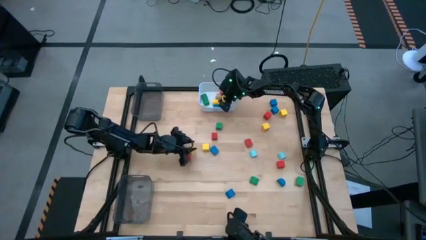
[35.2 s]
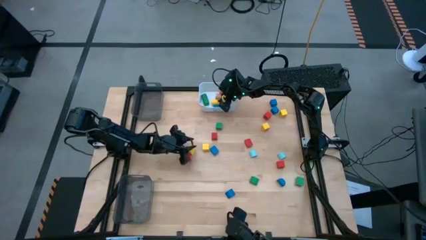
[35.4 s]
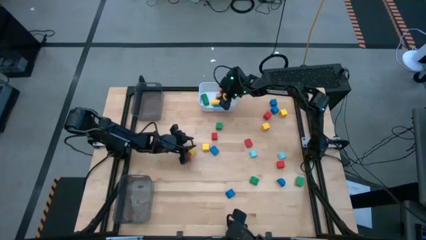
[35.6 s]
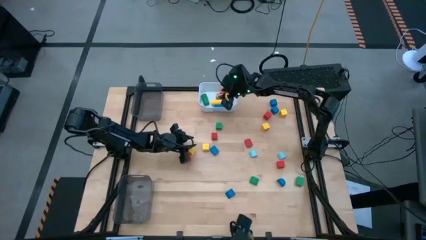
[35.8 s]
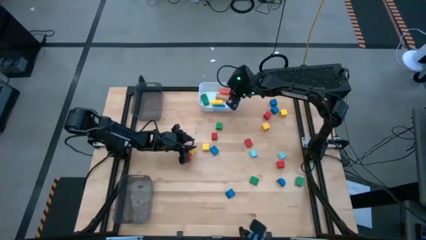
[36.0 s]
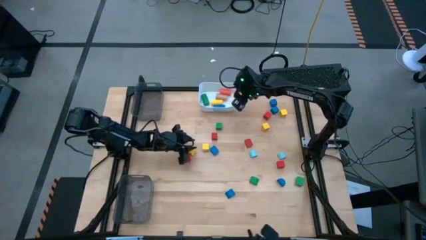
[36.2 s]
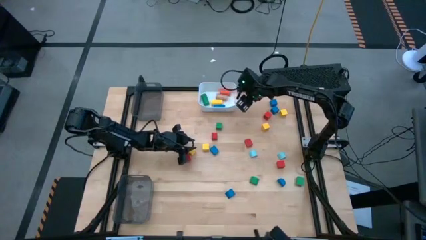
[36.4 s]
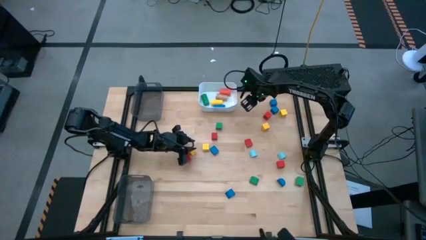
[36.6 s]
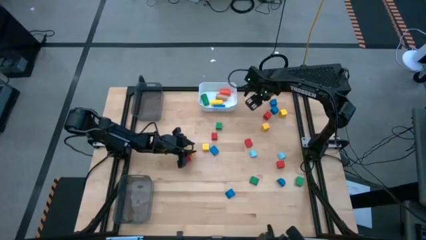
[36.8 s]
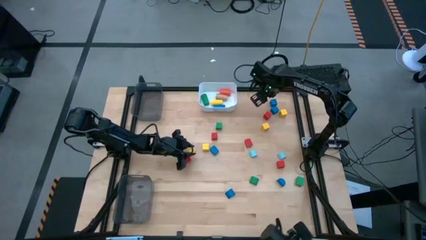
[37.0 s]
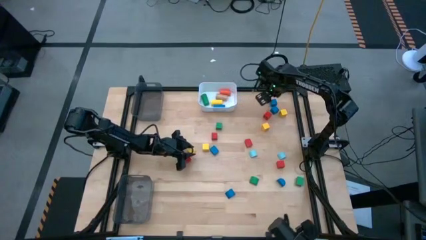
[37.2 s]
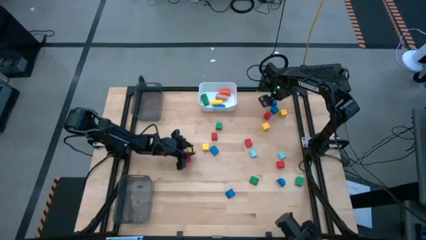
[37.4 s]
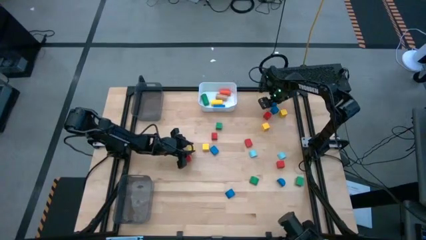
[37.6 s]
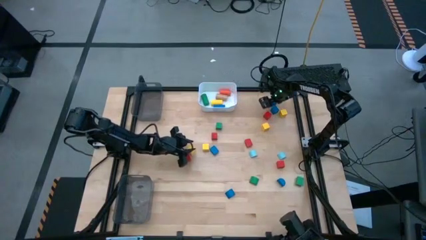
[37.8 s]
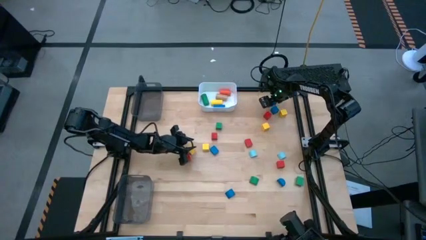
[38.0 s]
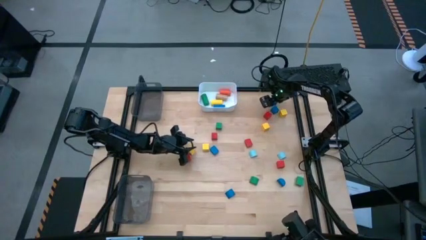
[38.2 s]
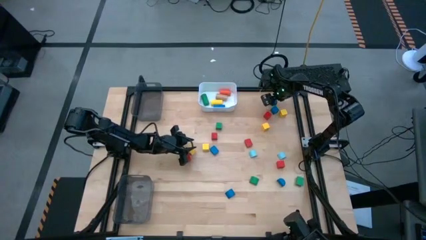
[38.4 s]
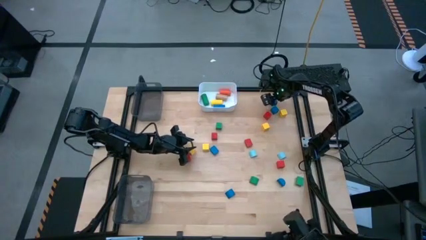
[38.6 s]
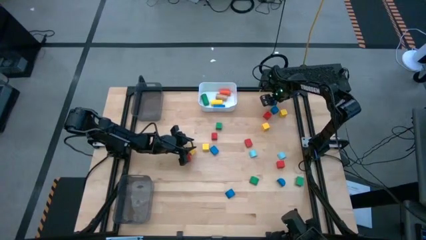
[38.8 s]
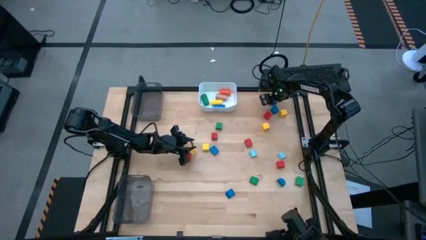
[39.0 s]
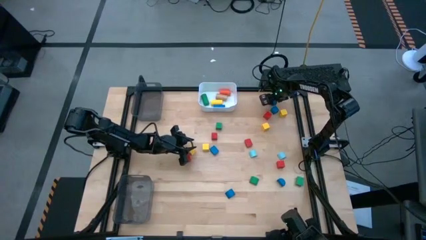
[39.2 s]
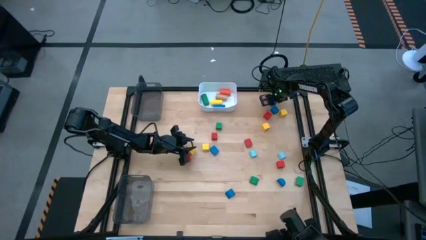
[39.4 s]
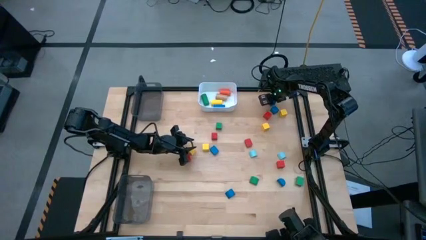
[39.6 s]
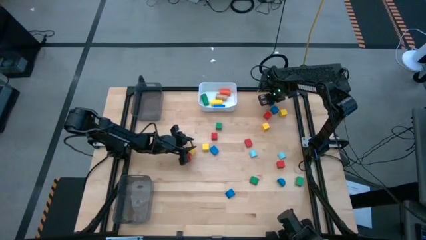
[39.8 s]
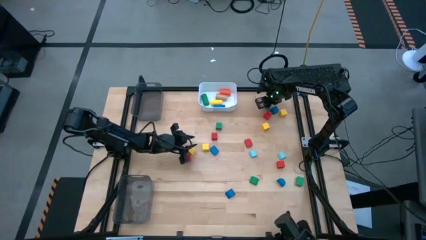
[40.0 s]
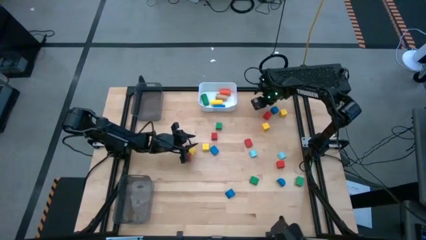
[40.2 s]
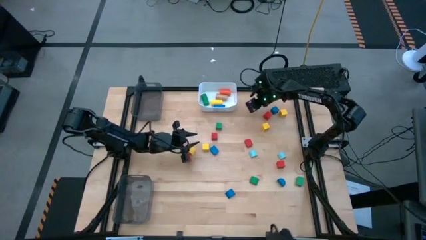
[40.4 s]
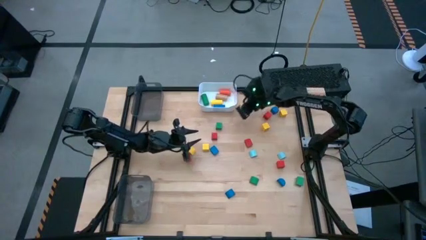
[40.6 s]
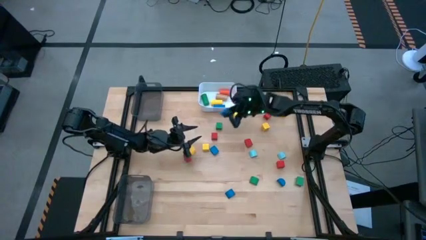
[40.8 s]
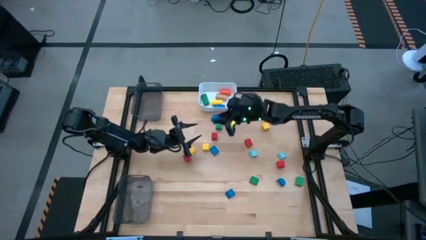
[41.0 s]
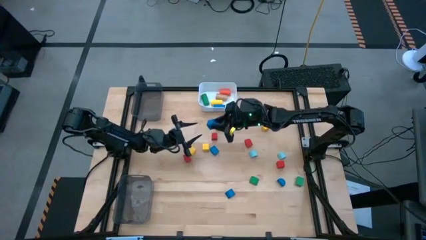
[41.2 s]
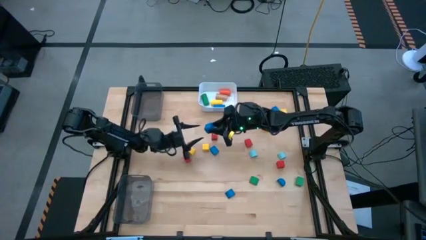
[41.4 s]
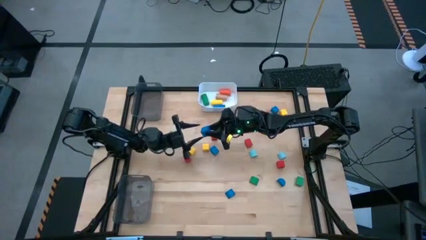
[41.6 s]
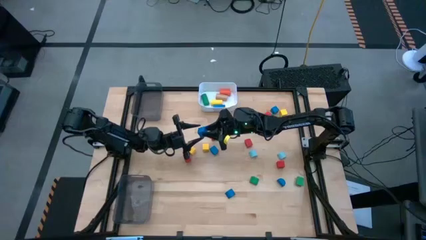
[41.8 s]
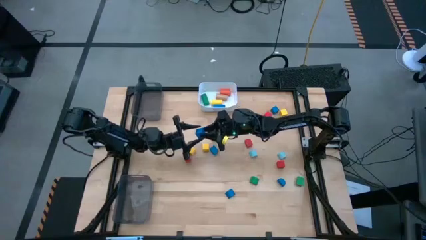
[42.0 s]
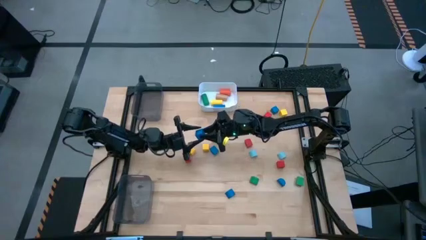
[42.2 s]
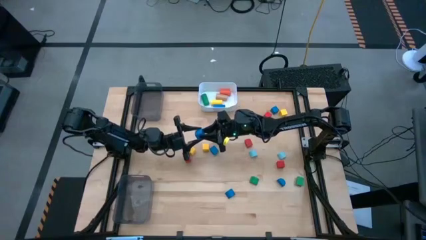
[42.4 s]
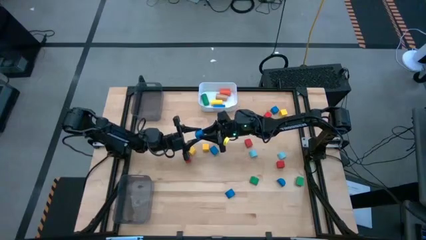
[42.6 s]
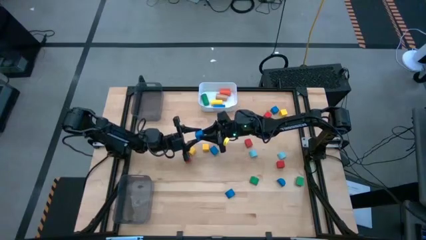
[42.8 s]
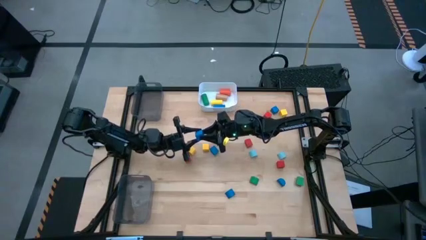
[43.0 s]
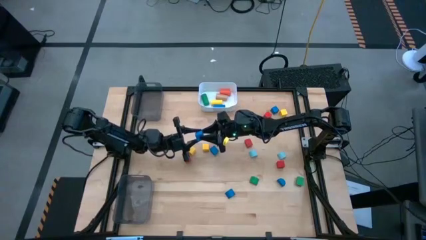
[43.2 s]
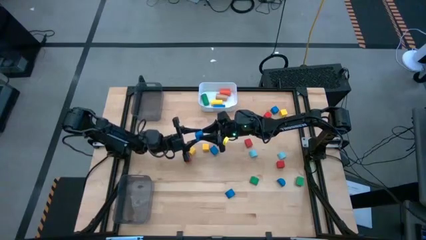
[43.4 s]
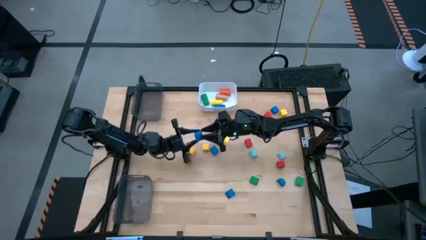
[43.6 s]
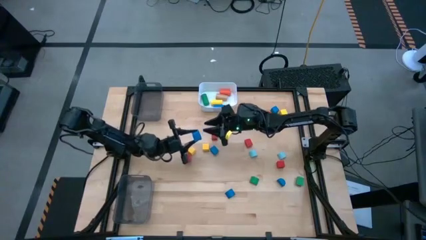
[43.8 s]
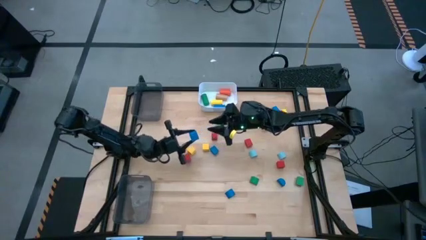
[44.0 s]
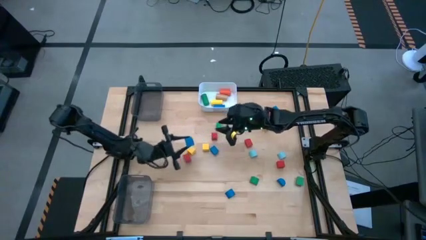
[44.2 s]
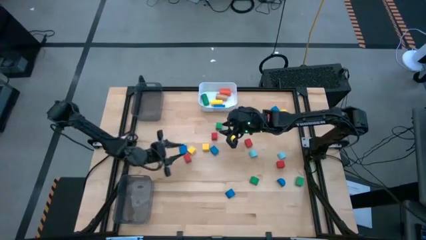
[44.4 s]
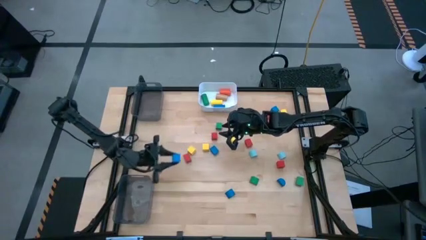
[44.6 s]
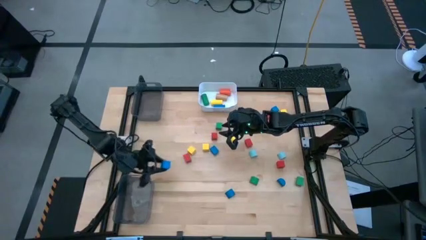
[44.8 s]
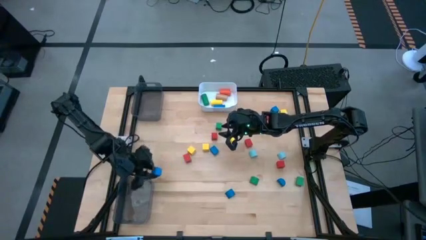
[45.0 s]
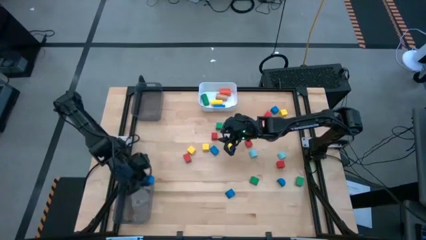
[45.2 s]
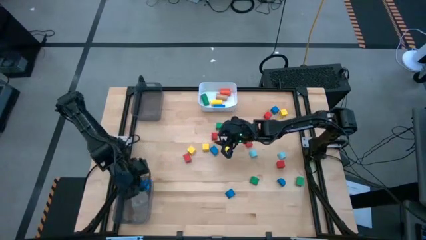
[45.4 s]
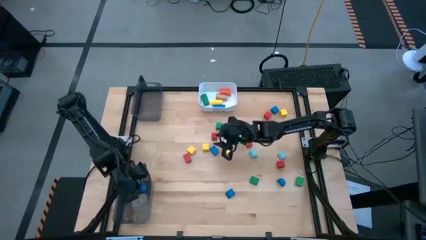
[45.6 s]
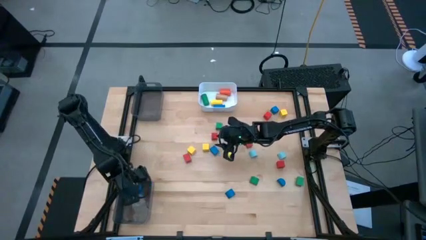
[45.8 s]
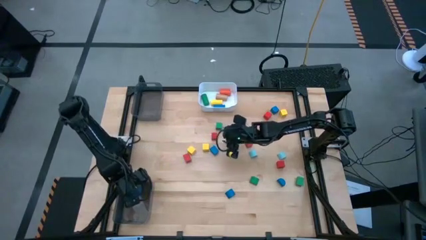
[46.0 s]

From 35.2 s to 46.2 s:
Task: Sort blocks by size
Put the blue square block into the bottom black bin

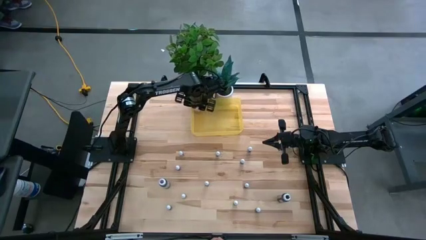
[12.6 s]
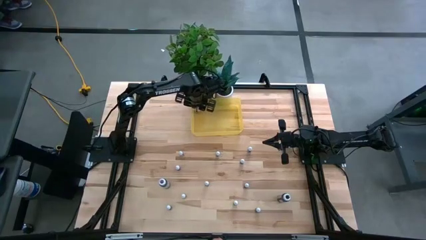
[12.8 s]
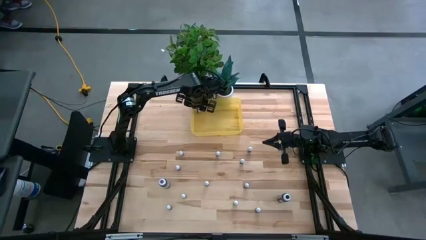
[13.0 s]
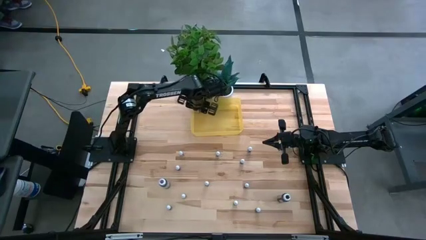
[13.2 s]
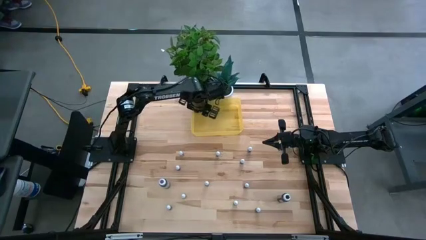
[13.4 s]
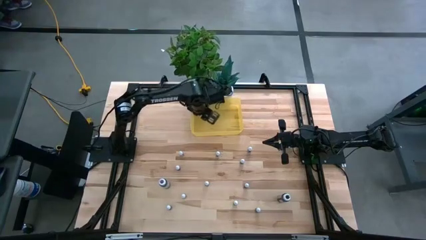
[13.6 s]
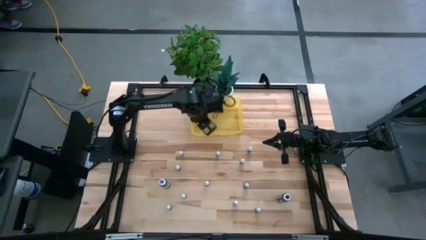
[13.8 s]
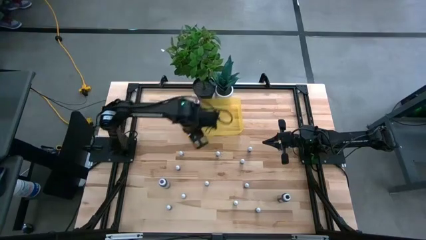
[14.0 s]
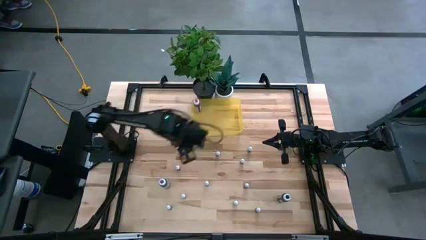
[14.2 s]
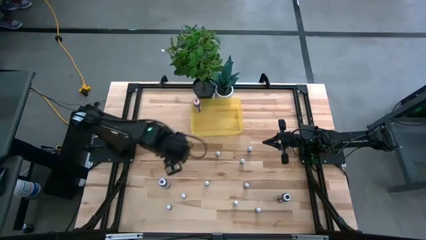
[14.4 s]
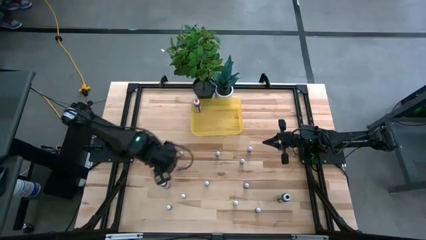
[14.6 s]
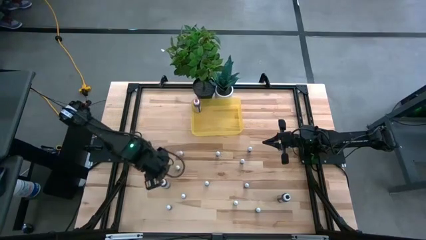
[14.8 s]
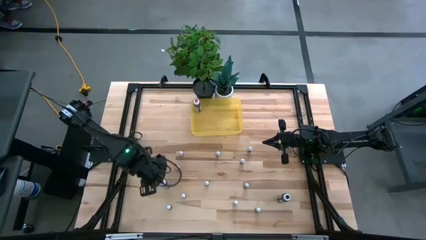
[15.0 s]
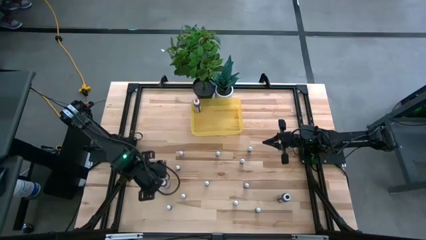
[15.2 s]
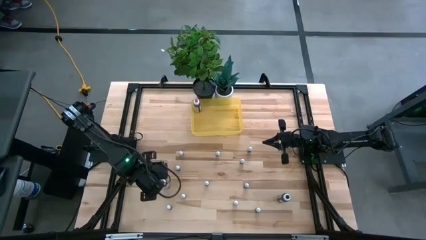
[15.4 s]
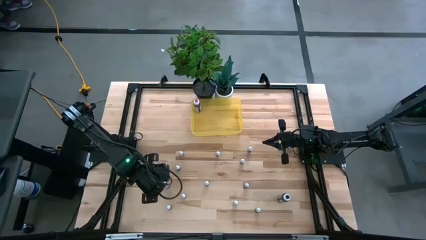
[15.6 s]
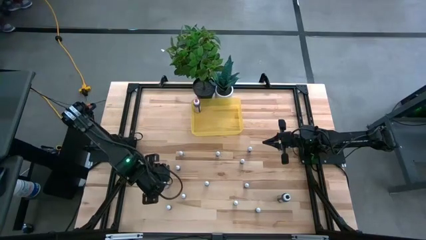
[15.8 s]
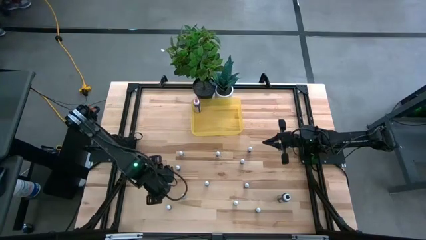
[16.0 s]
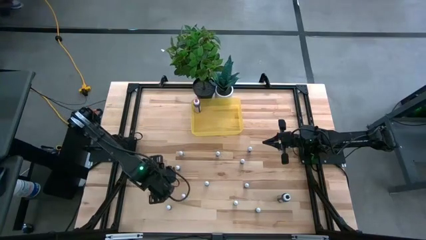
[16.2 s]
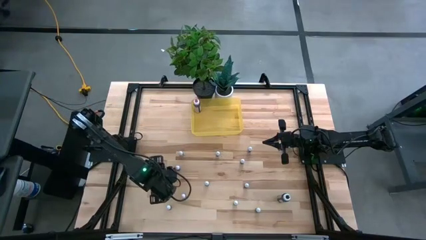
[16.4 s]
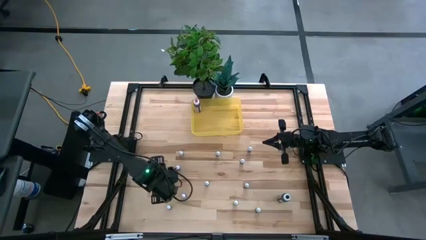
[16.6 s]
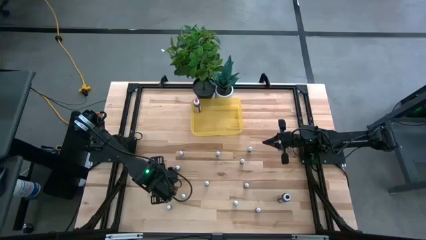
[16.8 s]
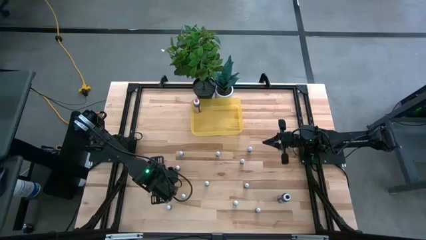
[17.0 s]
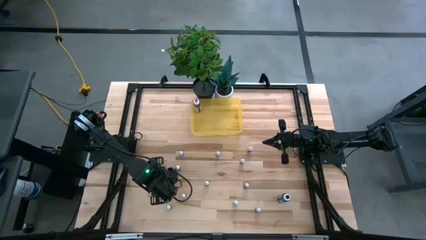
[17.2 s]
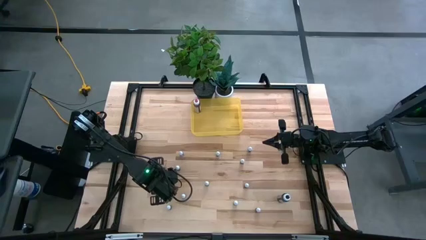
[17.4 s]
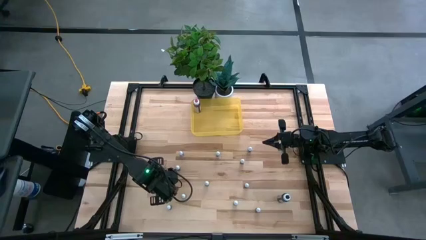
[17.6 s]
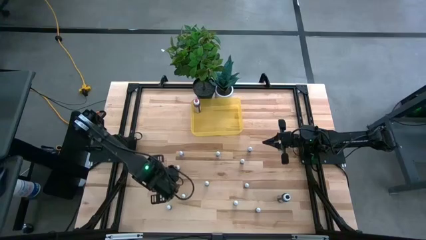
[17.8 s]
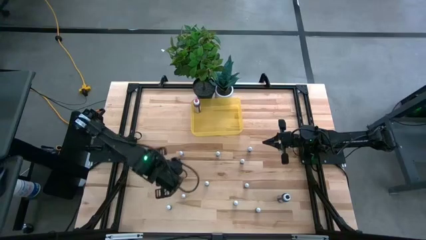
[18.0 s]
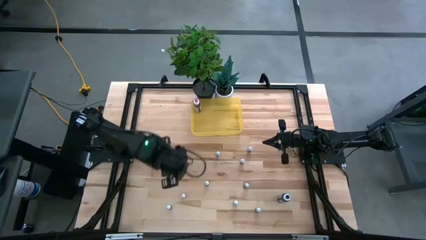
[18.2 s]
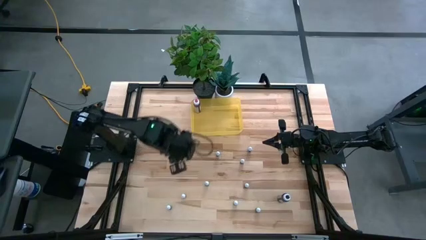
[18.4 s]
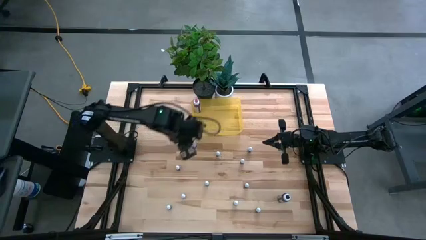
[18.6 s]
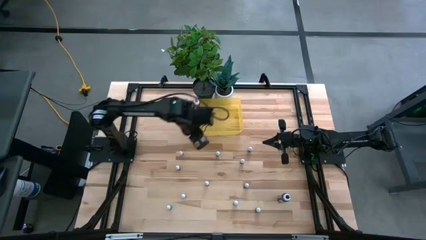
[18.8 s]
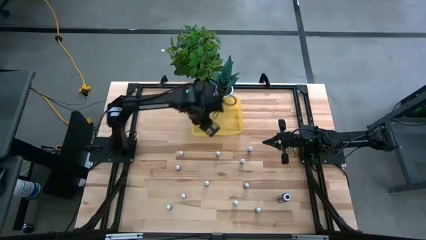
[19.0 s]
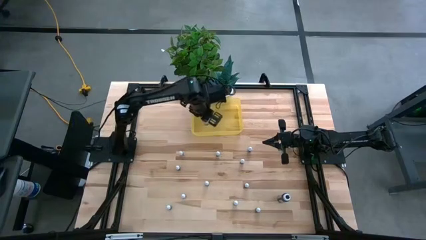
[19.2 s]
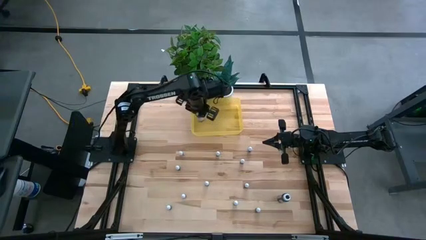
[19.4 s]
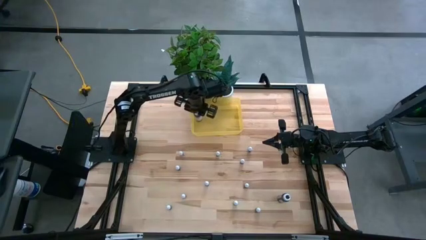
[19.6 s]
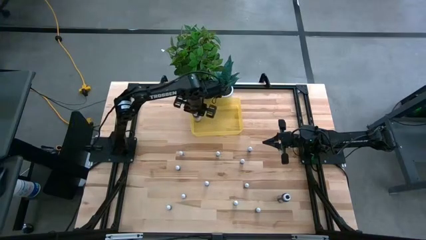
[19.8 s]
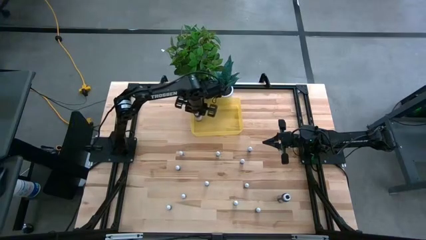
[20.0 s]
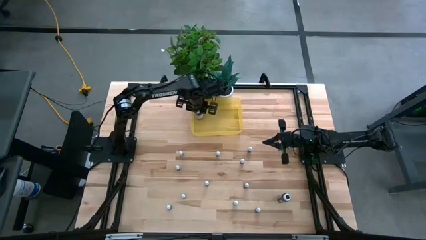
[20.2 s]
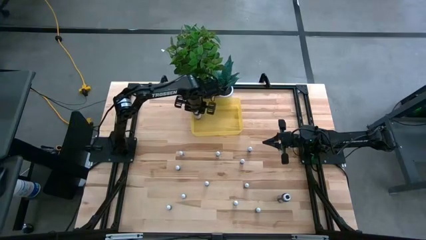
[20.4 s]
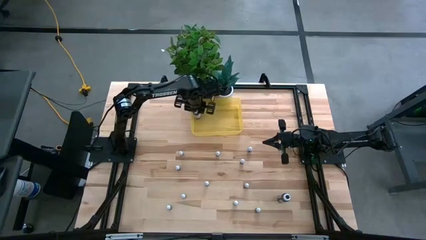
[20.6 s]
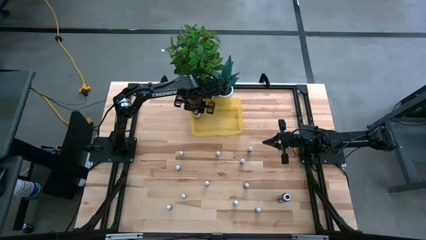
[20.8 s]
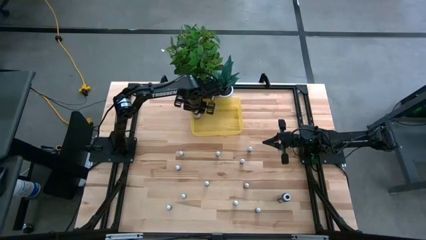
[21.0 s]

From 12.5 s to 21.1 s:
Task: Pick & Place food coloring
Put the large purple food coloring bottle into the yellow bin
